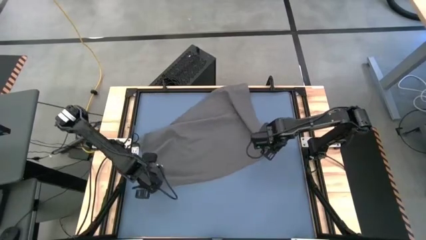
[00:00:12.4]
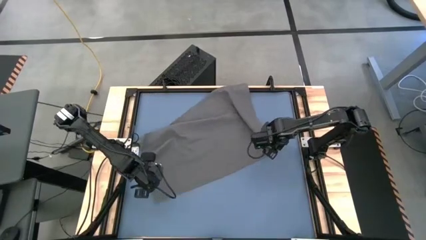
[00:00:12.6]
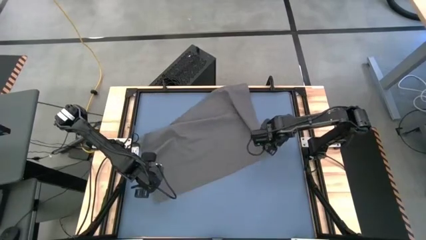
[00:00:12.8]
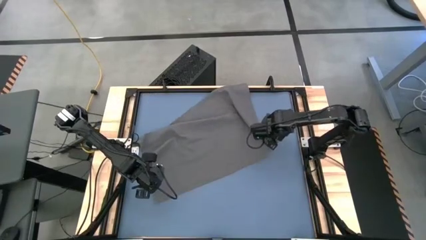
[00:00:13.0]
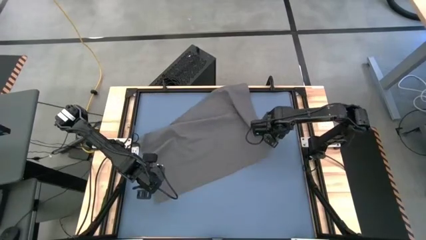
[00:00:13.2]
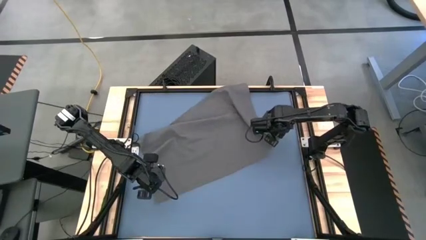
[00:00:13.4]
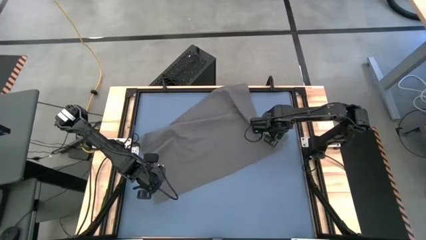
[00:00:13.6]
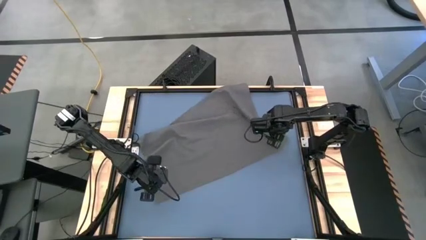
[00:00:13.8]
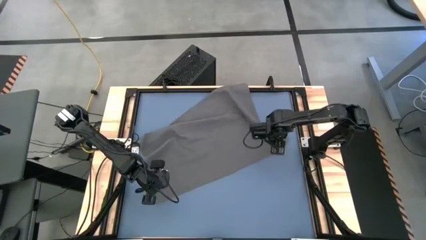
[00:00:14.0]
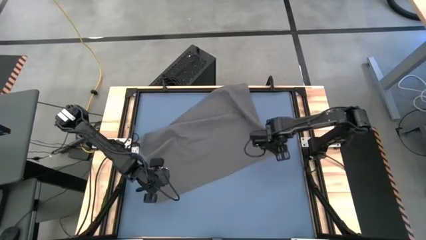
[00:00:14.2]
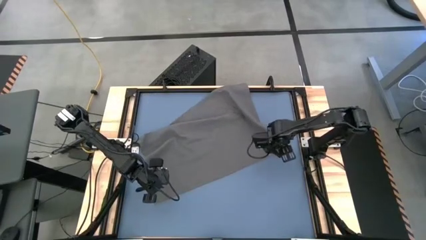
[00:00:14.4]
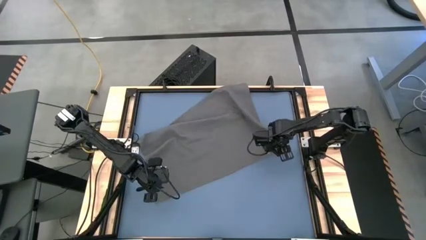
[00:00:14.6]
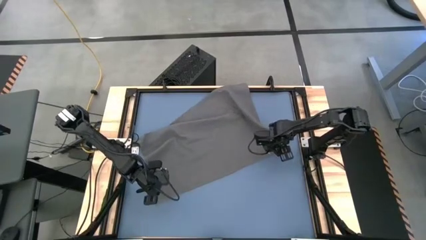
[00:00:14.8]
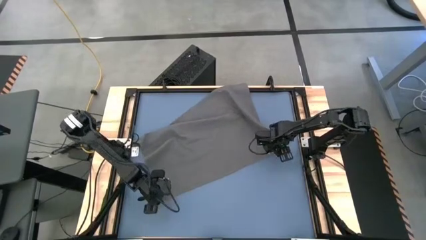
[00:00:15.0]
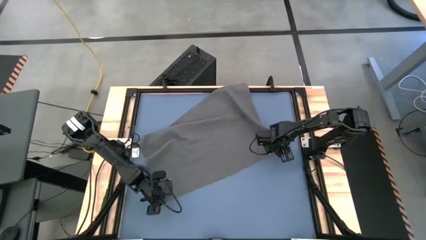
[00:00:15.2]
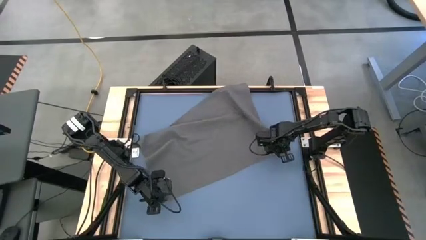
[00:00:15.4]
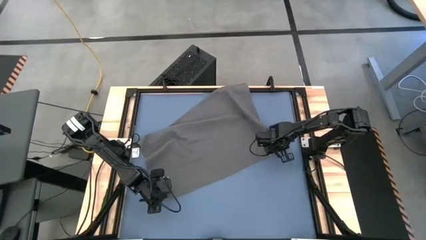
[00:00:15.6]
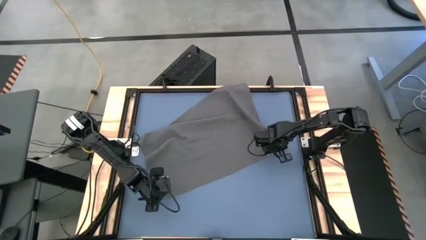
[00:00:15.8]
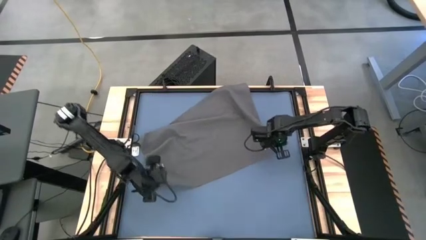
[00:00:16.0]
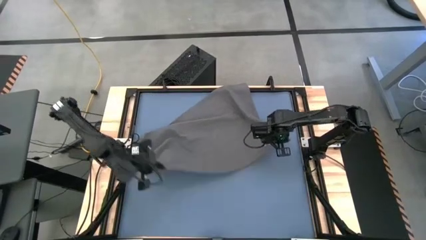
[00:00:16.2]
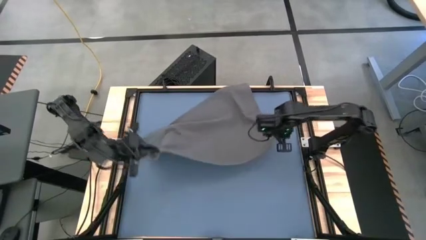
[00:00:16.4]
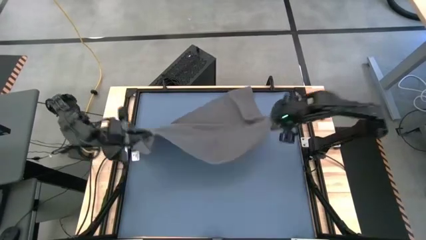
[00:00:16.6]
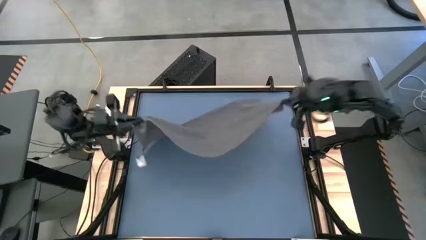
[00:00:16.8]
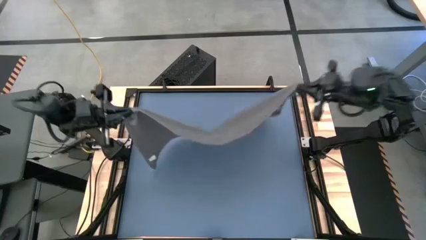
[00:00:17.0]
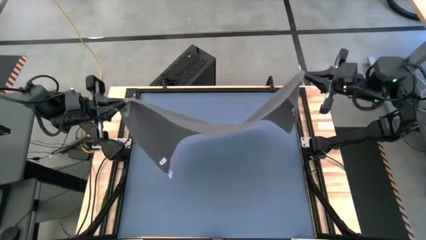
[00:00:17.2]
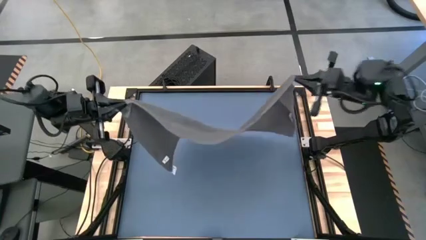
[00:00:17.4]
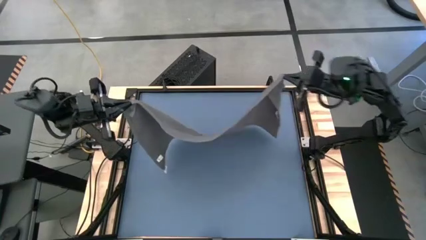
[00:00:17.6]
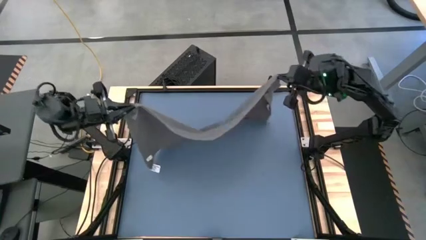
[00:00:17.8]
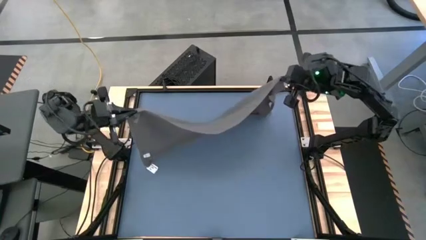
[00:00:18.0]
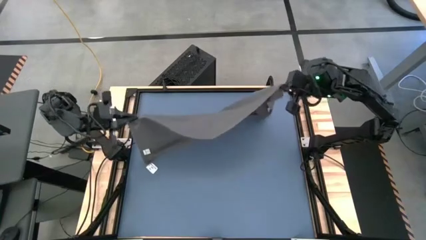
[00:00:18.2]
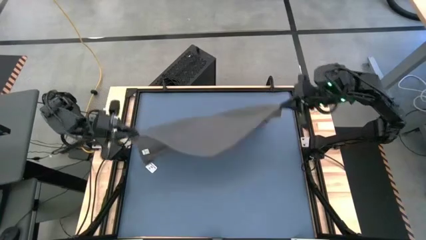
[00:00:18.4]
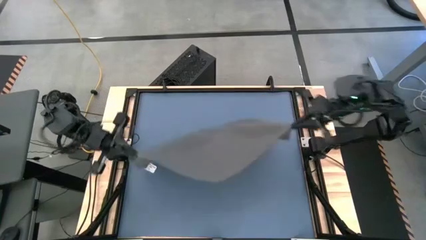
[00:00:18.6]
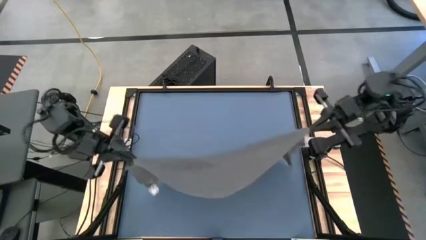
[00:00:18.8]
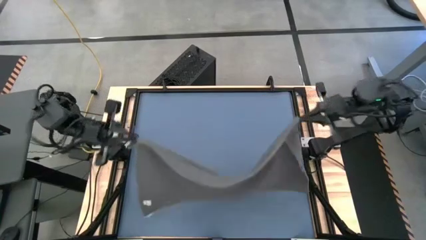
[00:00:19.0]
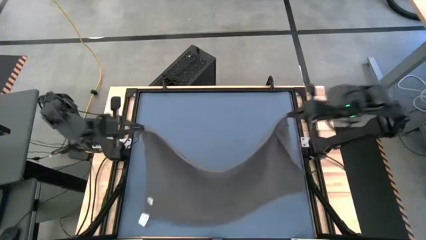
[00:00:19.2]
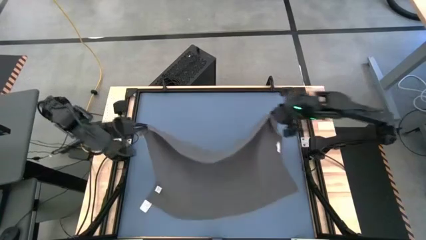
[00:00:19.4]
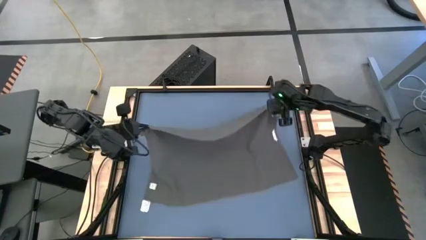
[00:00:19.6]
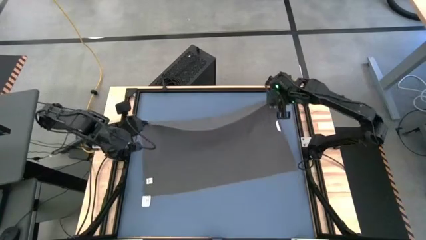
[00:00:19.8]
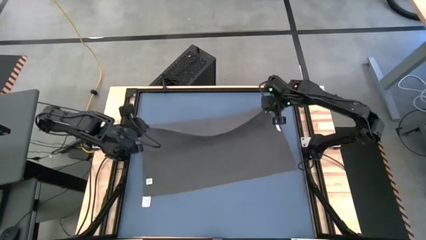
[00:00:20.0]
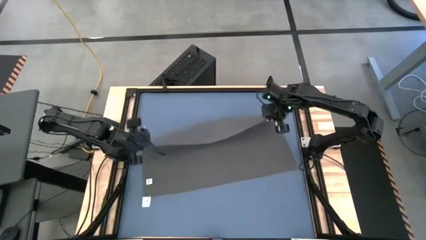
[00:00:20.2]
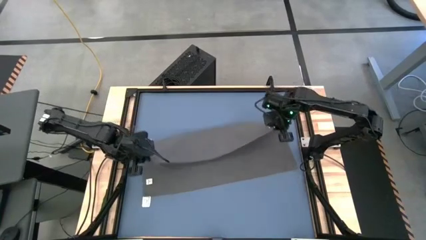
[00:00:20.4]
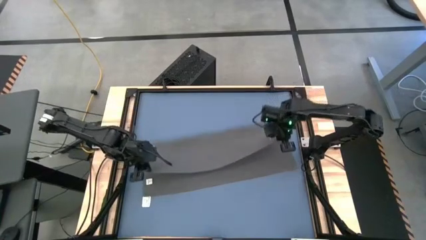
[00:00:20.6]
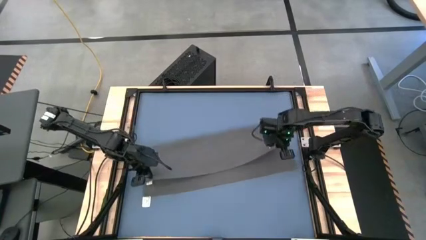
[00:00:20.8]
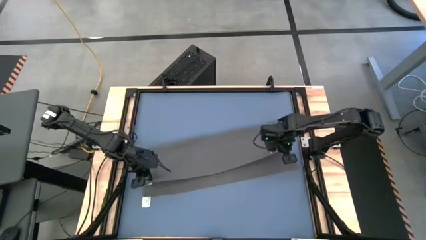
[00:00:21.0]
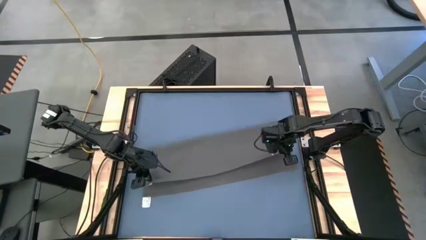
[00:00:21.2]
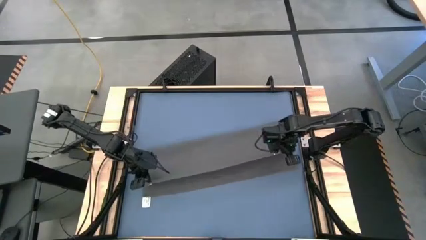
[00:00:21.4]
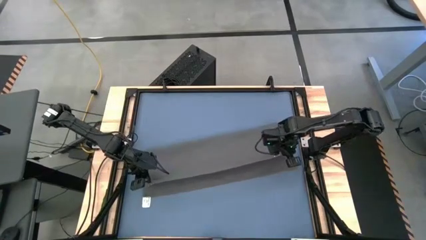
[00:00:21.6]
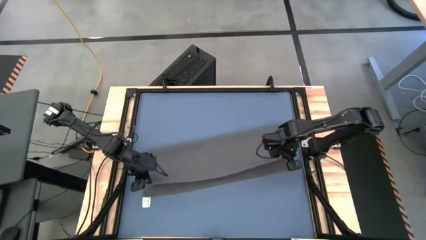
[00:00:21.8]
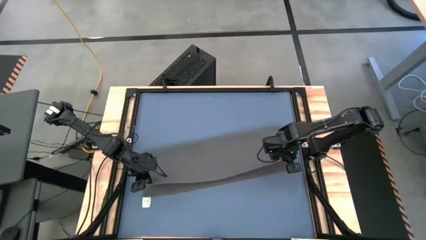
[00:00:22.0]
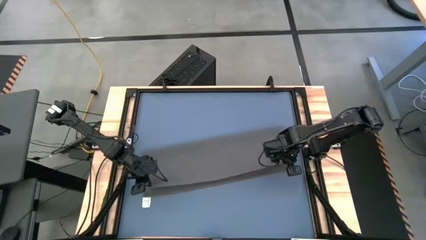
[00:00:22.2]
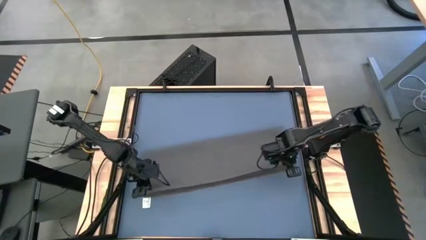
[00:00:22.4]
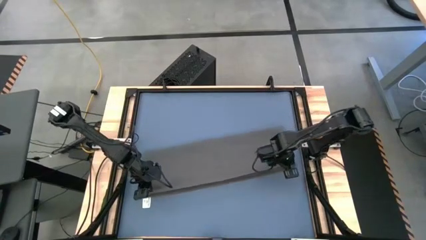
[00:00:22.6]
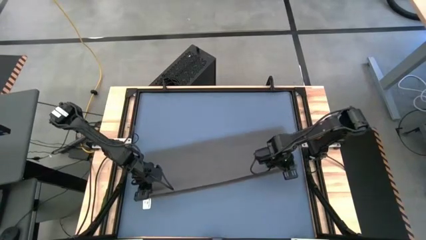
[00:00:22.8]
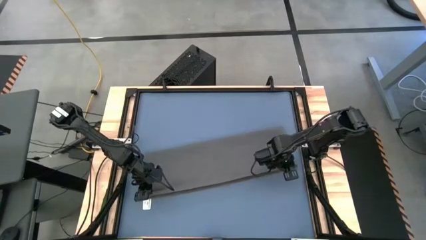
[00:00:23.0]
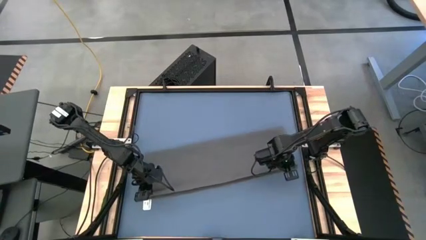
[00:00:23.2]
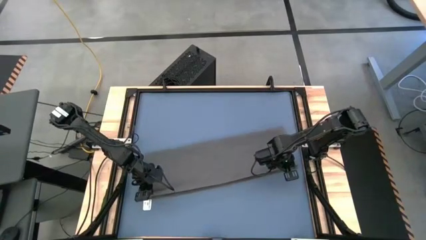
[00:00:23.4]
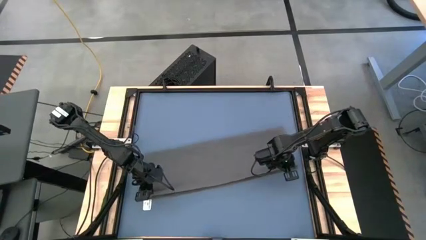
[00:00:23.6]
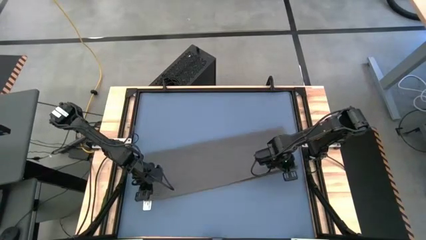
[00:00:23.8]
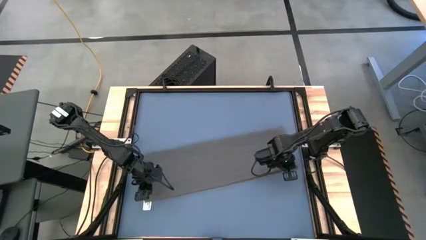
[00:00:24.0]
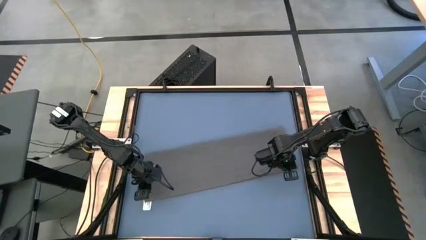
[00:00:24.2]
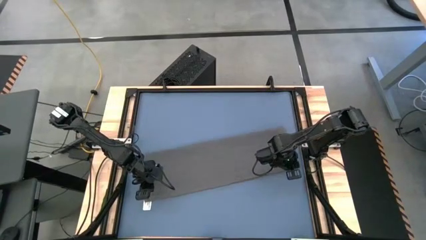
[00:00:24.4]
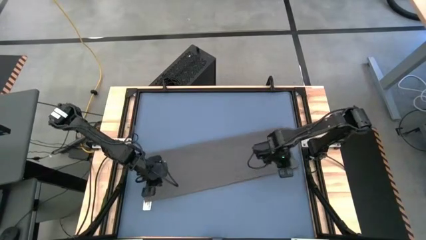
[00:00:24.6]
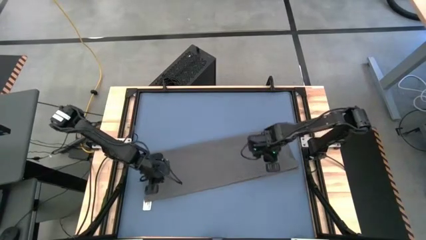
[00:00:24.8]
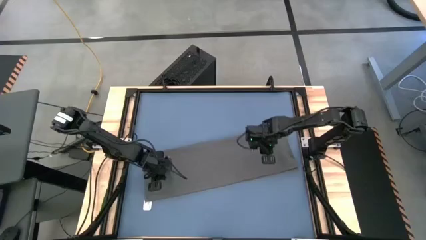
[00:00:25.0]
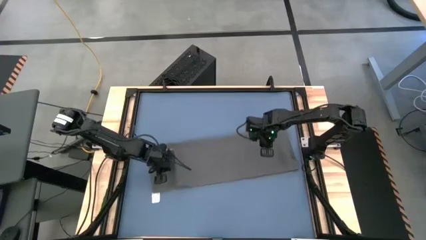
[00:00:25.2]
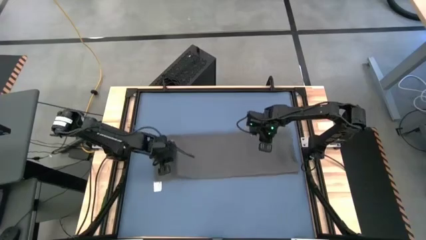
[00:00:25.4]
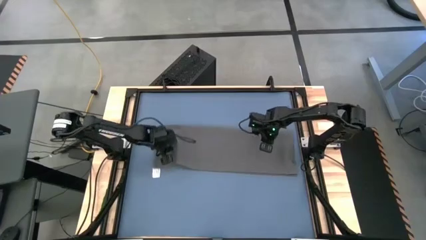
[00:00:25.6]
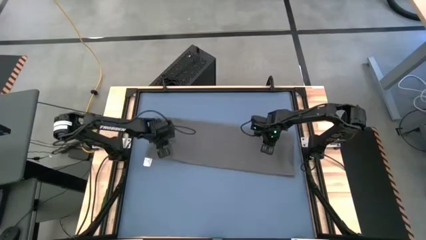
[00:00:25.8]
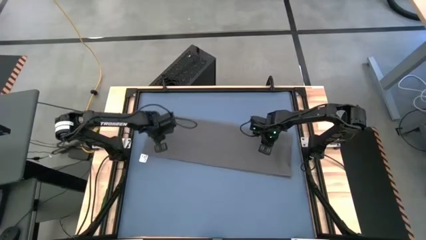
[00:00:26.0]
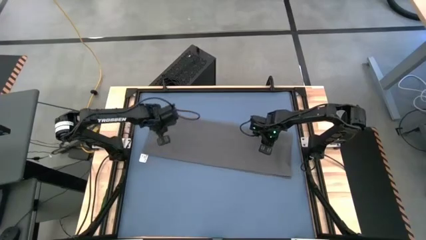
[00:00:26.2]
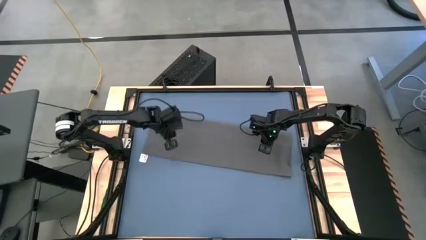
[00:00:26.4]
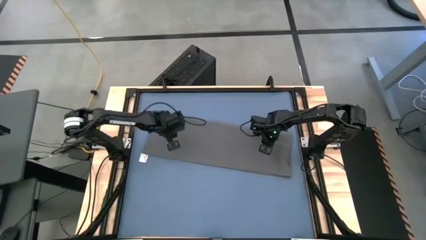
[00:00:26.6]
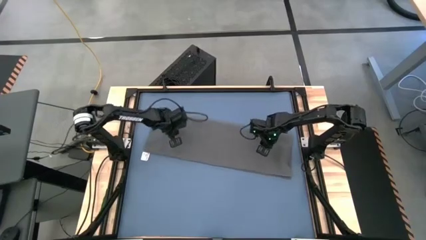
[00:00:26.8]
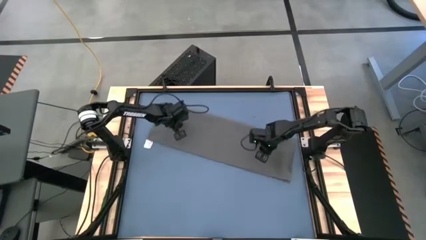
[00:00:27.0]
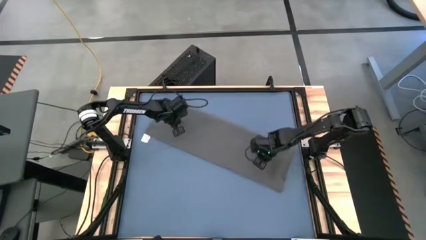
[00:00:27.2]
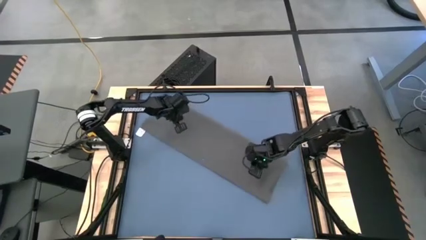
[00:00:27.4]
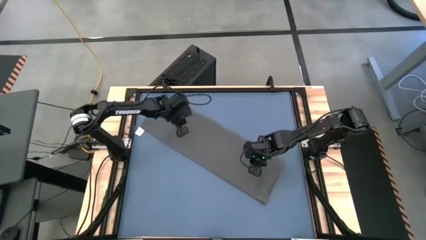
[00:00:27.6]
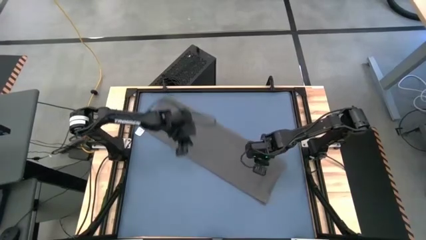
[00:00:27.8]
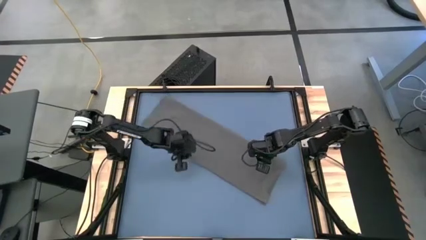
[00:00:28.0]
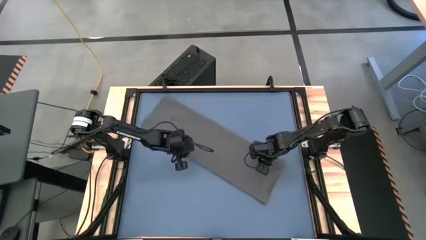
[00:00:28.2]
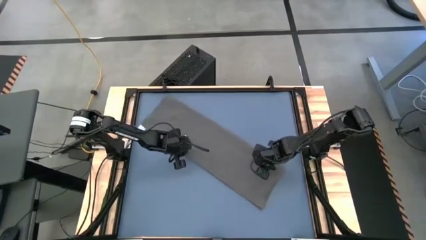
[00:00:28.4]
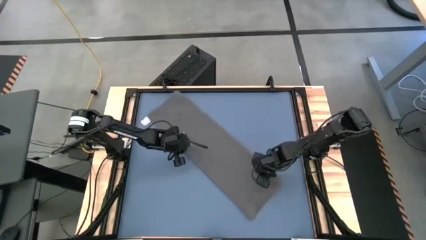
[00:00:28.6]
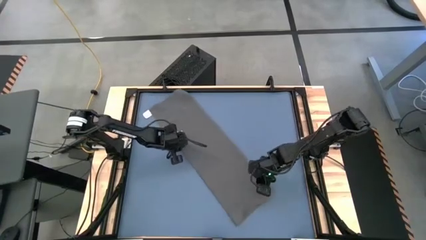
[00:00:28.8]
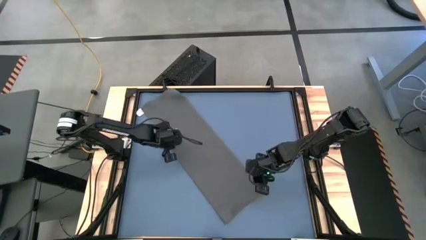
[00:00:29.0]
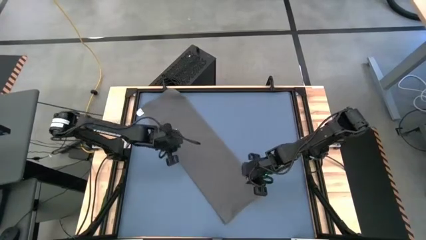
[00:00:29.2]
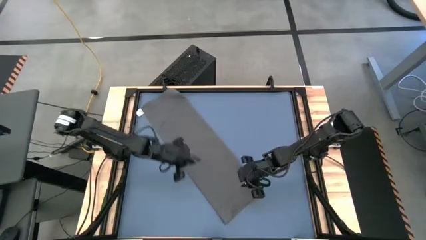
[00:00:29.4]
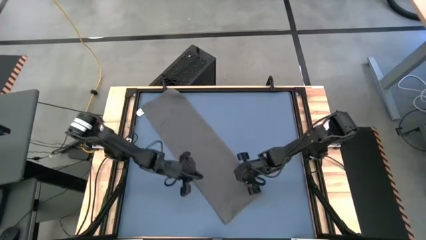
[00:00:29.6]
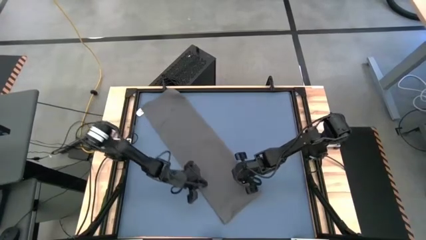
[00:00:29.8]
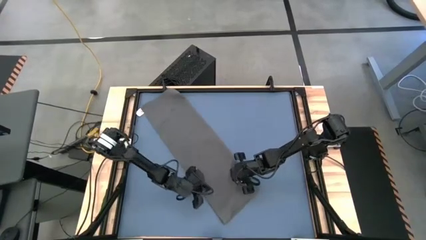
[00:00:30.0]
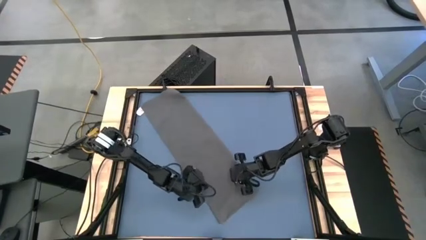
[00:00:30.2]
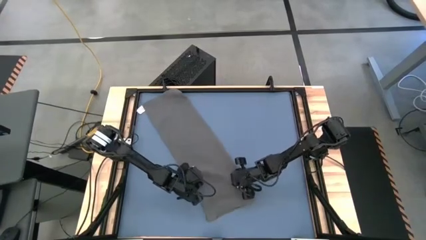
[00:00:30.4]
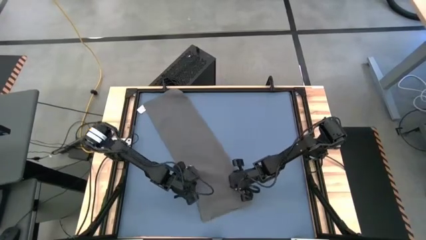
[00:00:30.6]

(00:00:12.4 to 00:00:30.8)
Task: Roll towel into tight, uniform cylinder
Roll the gray towel
